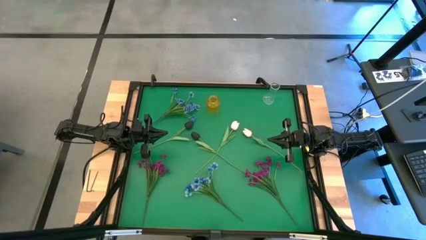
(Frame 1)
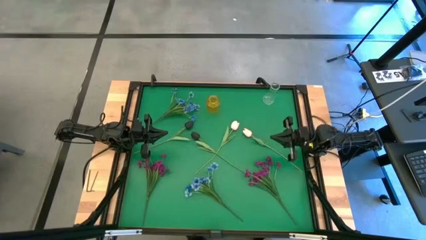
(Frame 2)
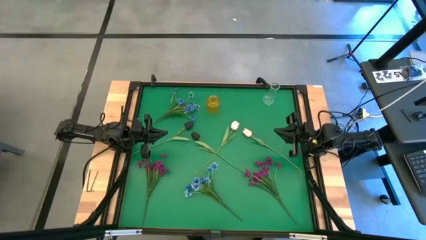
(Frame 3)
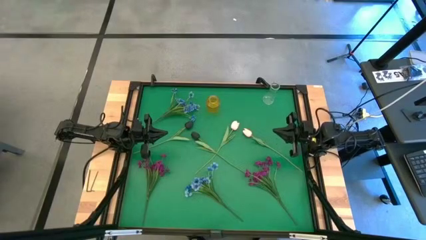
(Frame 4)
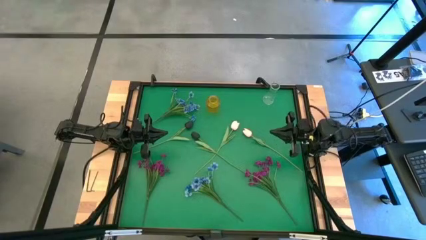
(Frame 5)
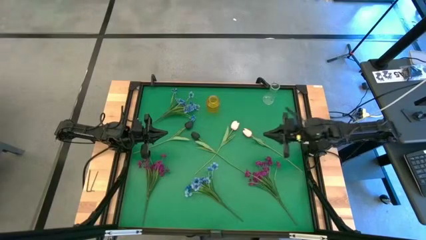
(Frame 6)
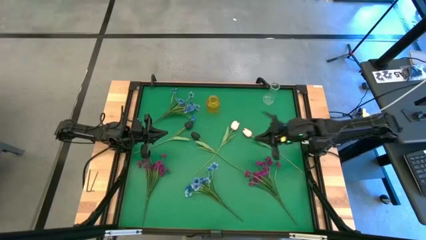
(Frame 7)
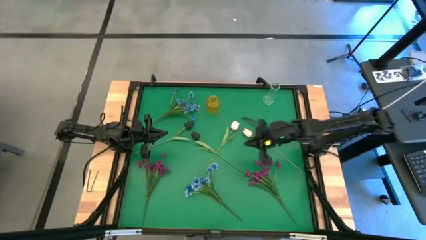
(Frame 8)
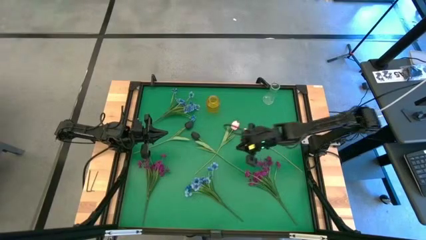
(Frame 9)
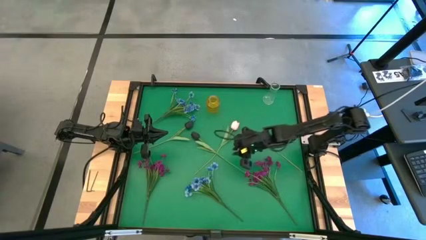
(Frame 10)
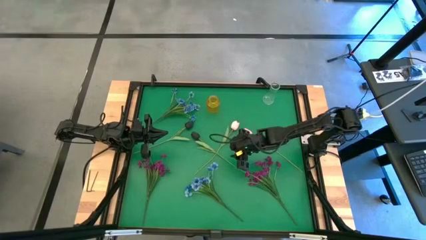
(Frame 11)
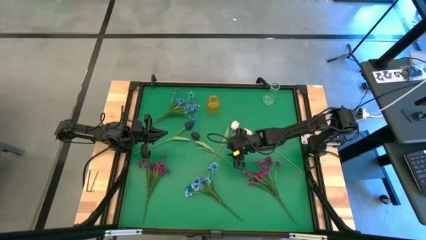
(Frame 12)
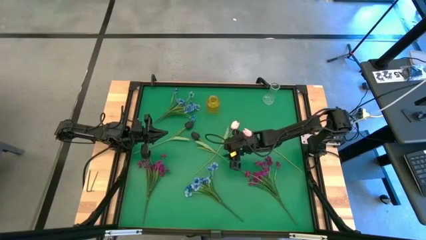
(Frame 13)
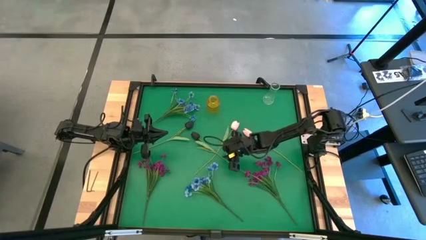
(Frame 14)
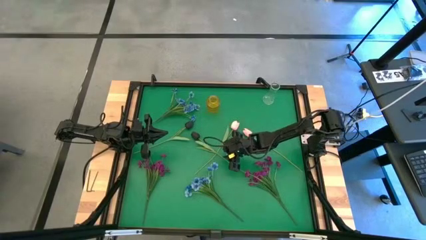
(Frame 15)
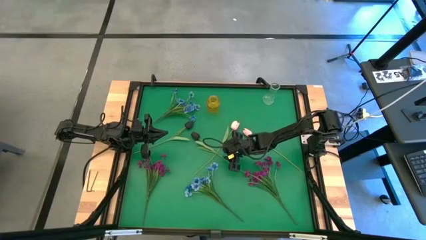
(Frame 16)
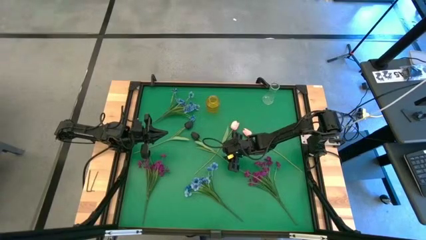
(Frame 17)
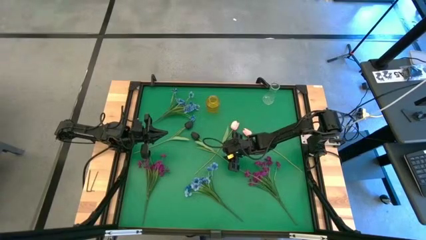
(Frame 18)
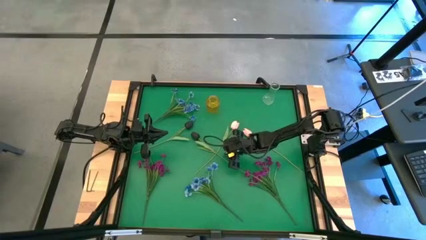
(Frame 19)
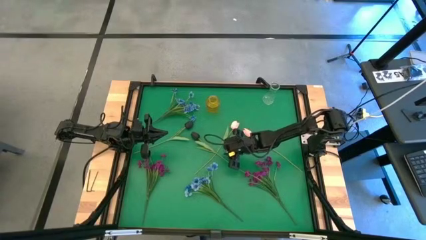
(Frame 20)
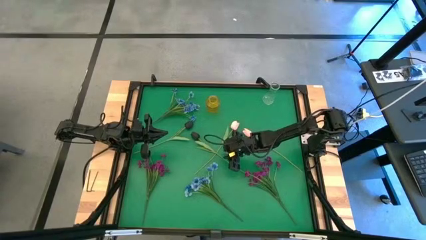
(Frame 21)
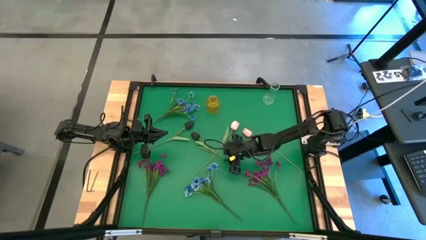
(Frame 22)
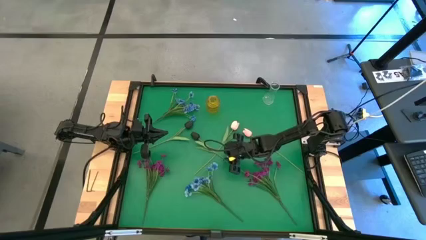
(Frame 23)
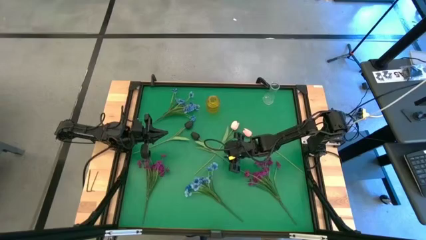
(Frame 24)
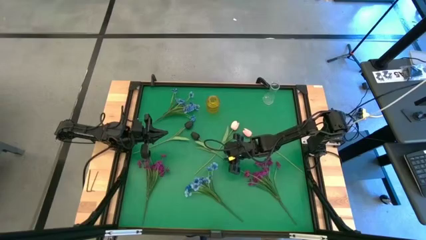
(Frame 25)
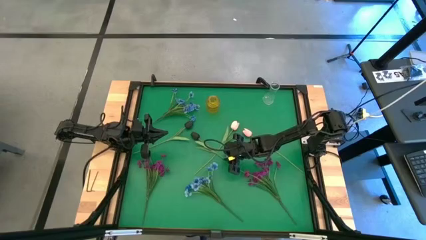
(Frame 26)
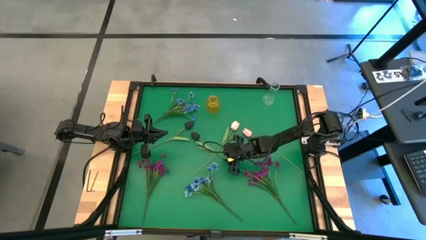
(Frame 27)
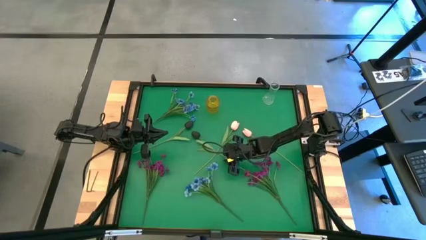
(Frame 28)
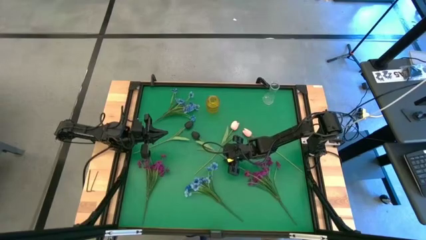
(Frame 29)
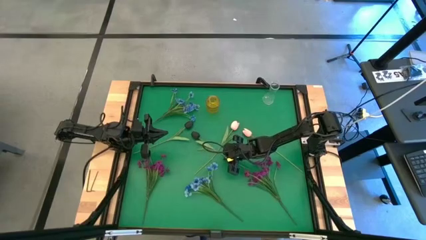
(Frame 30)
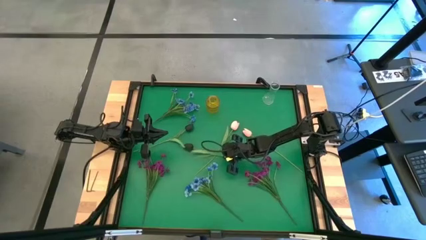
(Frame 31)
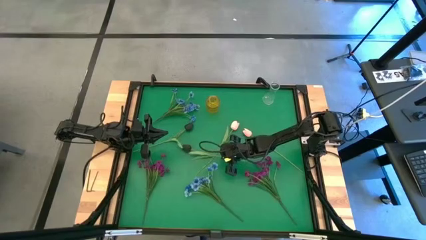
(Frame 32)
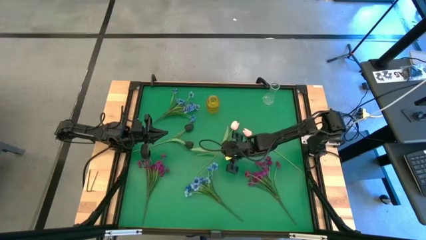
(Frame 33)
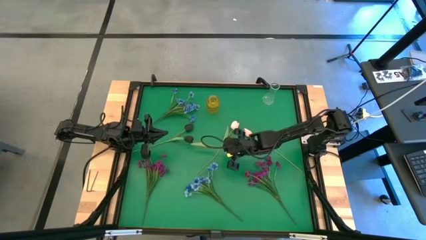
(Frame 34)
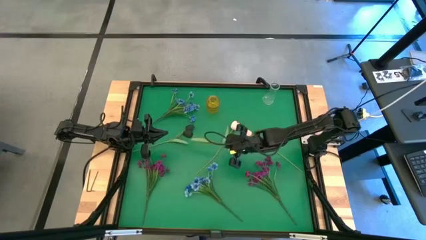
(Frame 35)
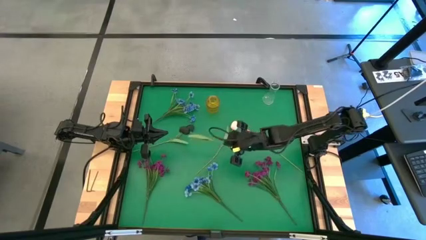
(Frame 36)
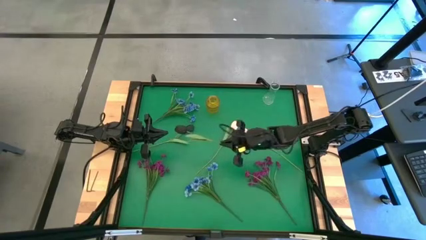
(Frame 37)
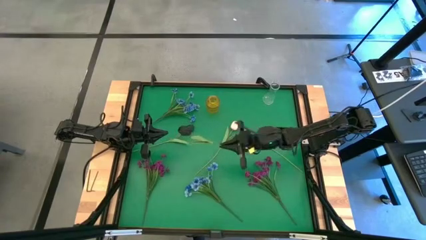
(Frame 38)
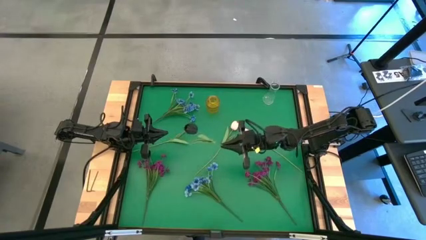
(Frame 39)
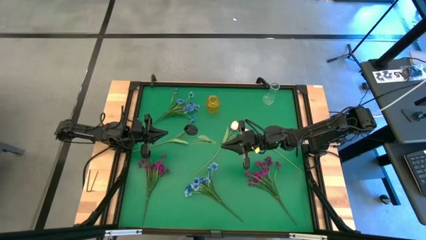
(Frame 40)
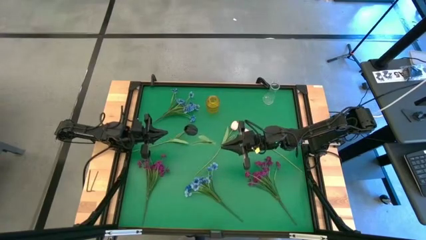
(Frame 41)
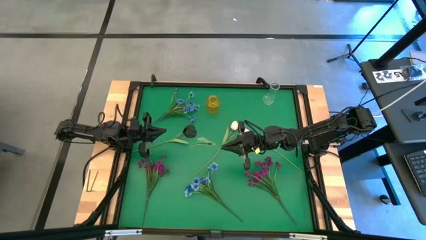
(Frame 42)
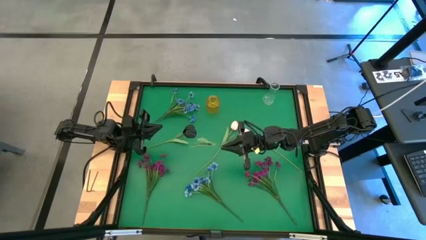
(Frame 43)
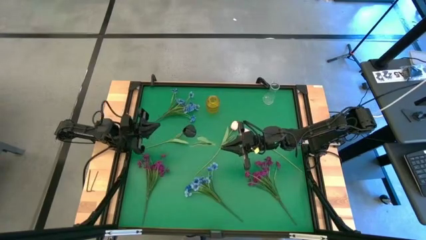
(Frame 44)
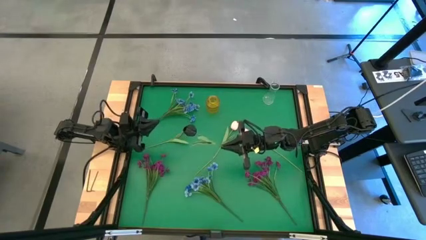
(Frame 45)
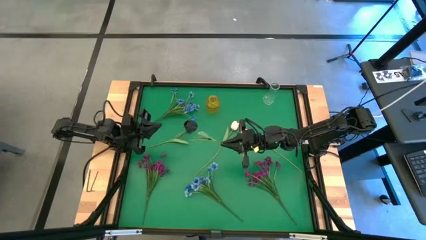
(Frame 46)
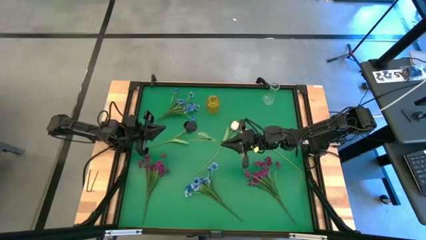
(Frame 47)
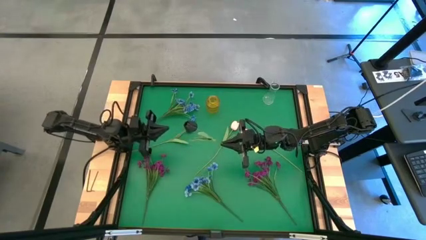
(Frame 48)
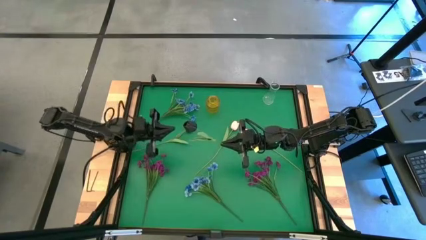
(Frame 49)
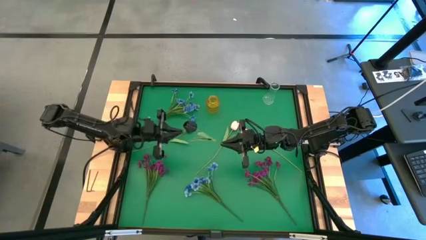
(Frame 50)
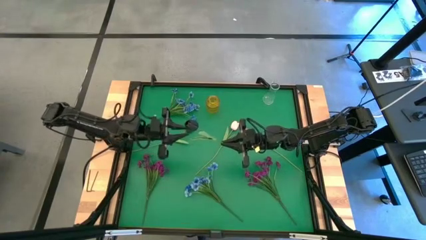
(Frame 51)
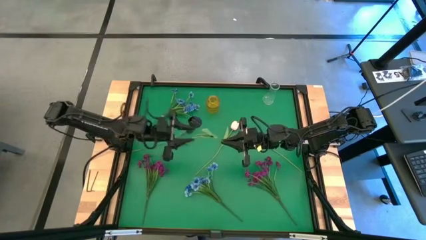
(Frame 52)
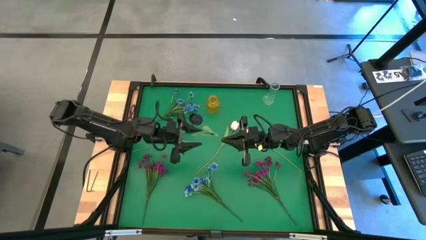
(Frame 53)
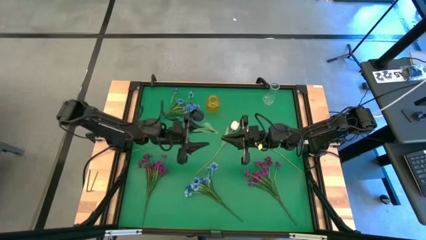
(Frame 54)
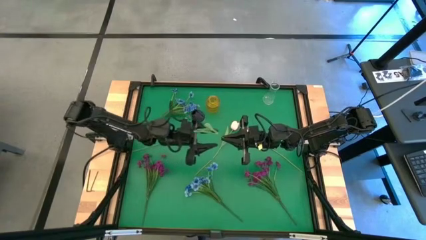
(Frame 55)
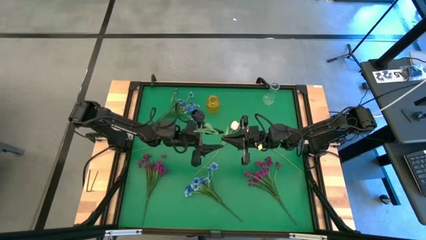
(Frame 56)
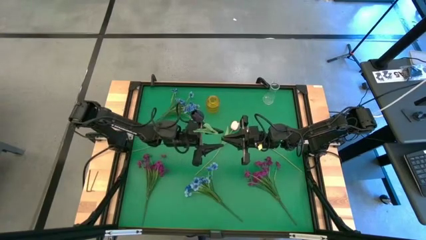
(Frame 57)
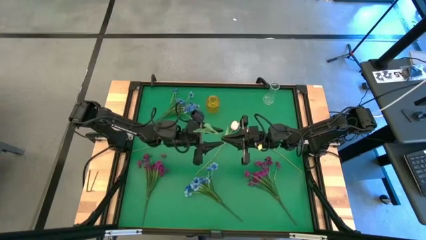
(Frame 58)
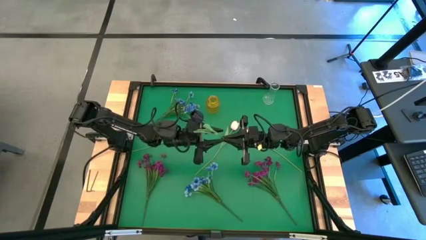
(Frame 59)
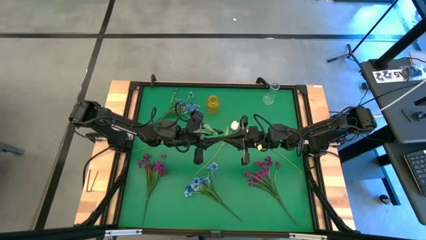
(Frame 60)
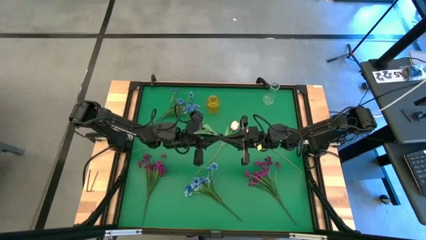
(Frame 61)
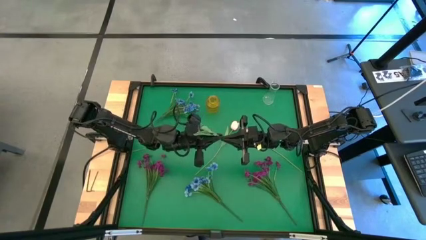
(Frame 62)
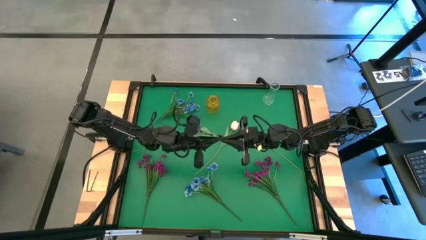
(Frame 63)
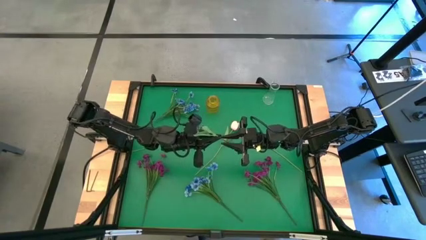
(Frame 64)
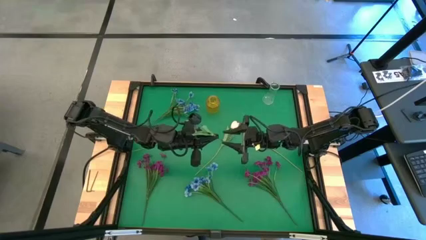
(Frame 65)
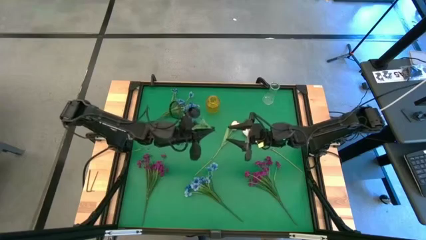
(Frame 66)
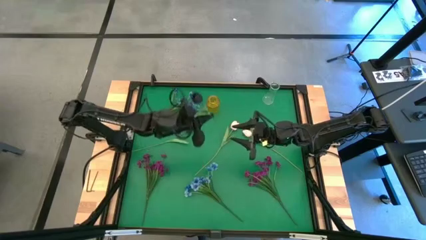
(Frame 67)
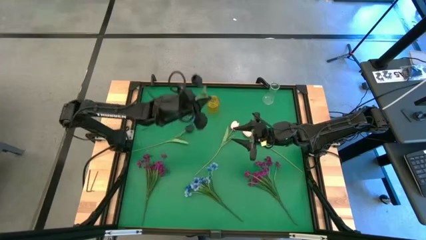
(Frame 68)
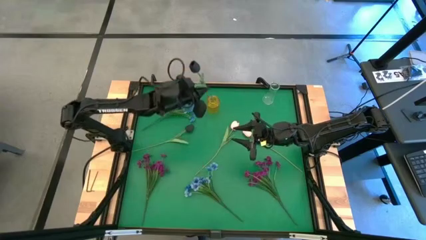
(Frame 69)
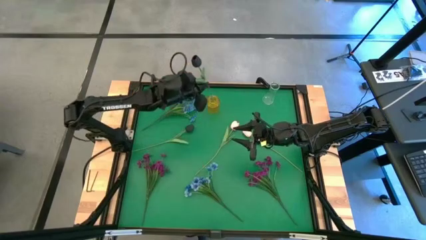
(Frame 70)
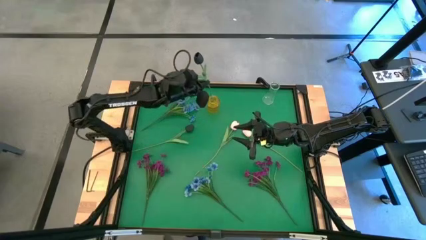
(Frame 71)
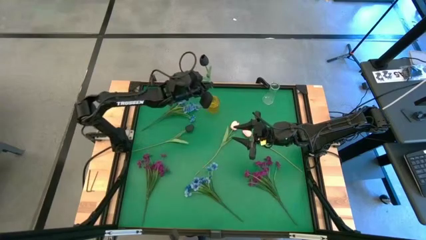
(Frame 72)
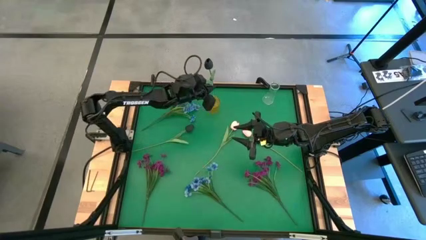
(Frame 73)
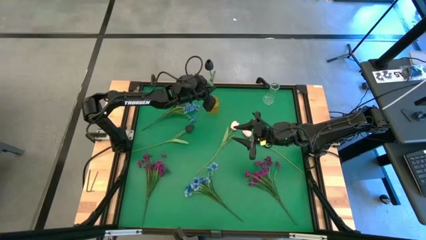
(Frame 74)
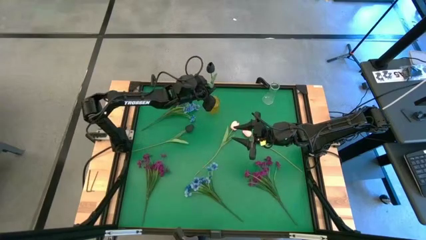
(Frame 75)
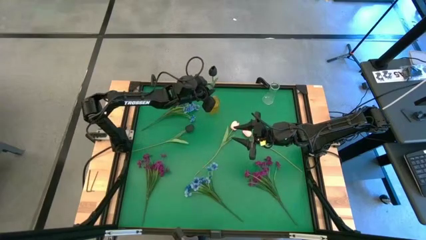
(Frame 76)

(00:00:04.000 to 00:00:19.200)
Task: Sort flowers into vase by color
Put the bottom black flower into the yellow vase
